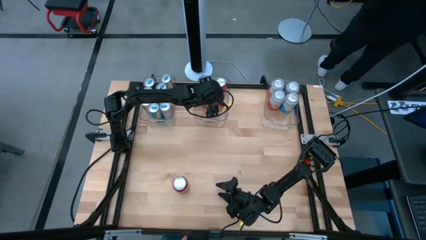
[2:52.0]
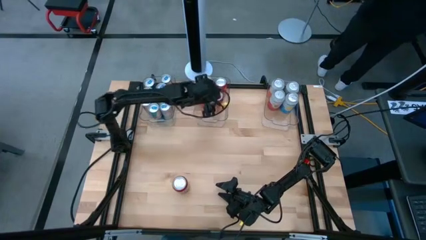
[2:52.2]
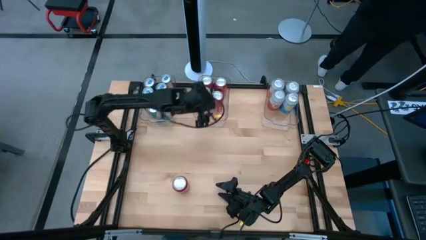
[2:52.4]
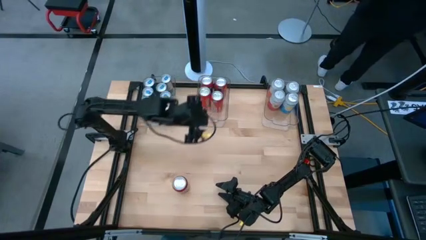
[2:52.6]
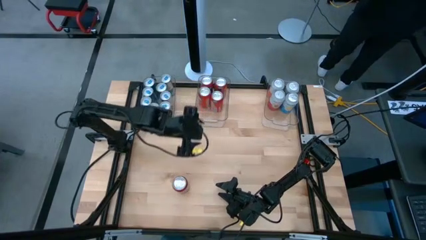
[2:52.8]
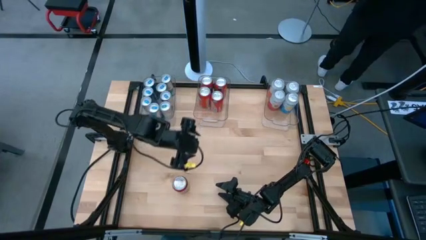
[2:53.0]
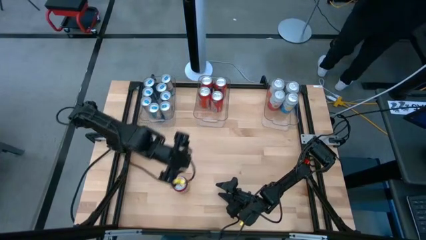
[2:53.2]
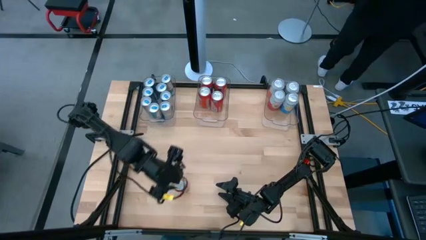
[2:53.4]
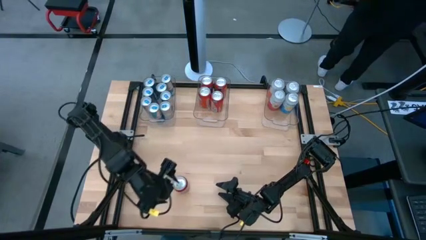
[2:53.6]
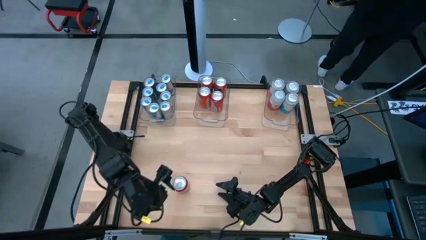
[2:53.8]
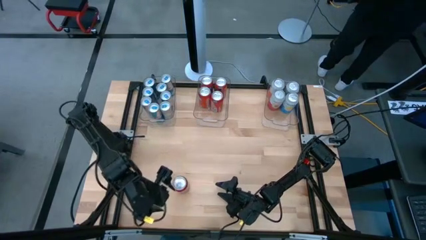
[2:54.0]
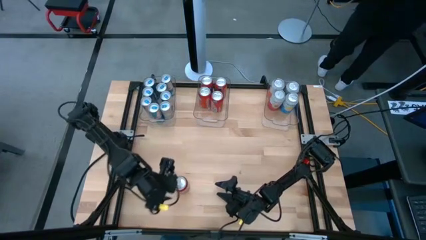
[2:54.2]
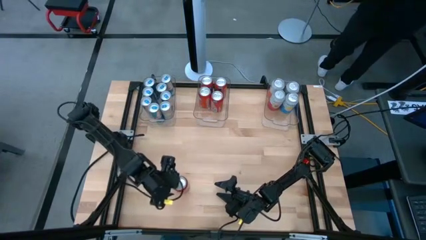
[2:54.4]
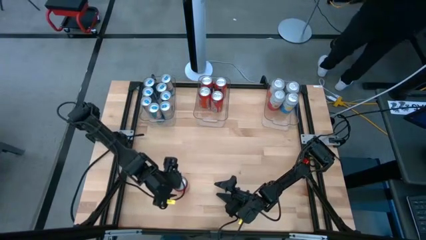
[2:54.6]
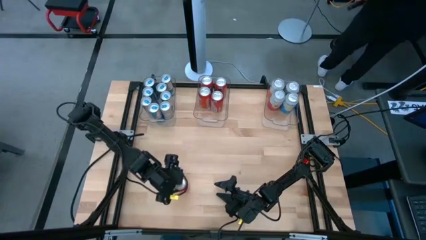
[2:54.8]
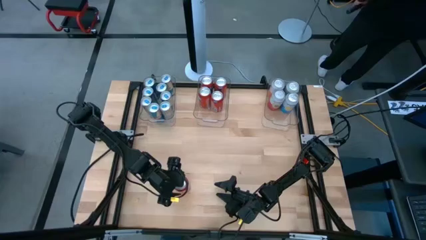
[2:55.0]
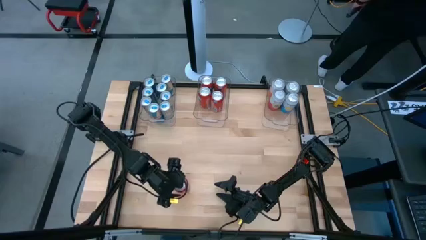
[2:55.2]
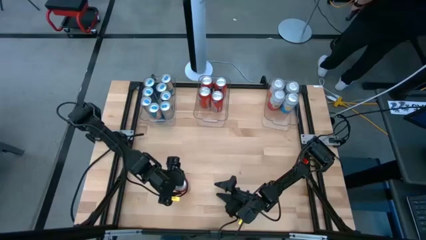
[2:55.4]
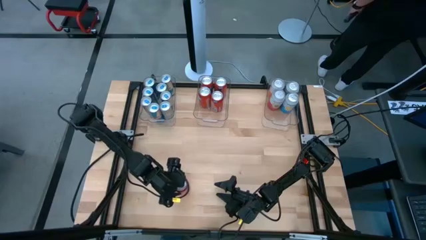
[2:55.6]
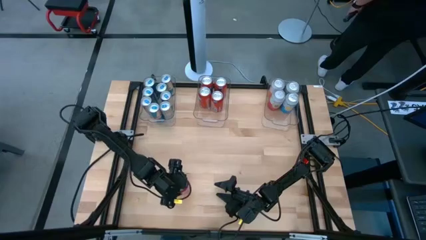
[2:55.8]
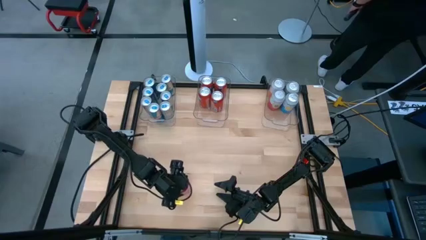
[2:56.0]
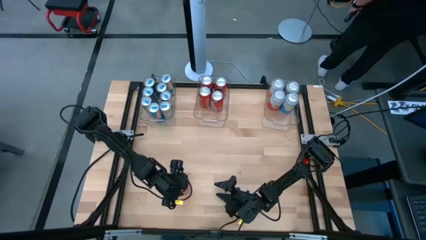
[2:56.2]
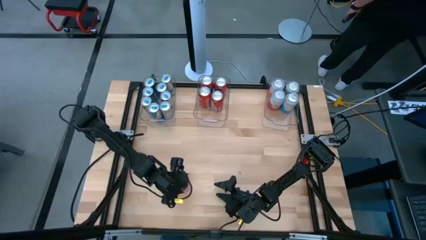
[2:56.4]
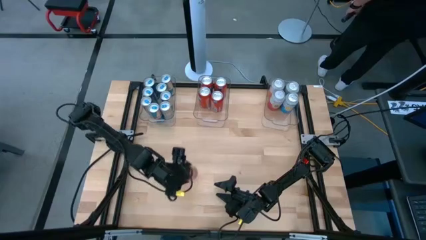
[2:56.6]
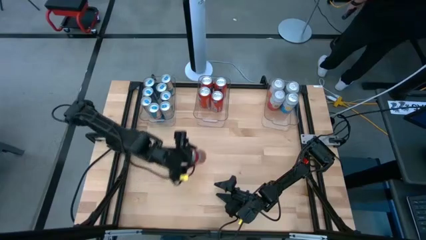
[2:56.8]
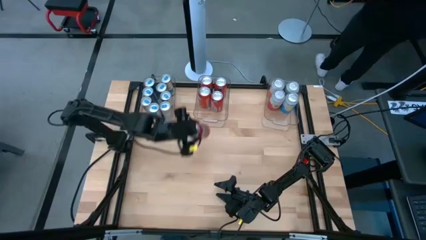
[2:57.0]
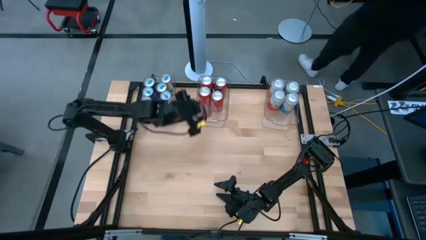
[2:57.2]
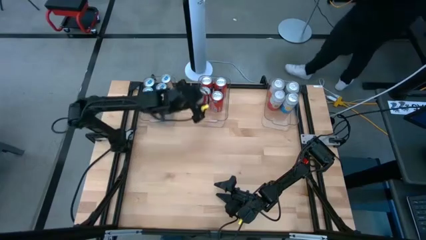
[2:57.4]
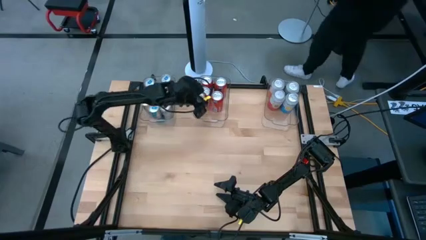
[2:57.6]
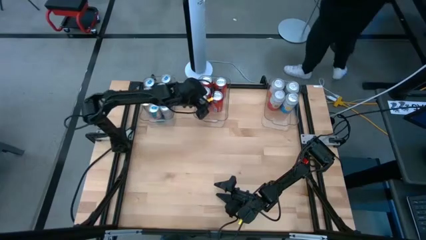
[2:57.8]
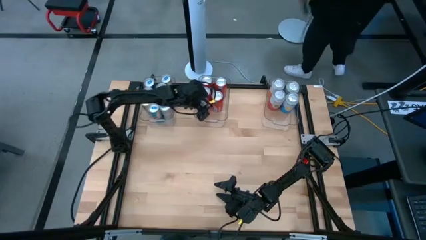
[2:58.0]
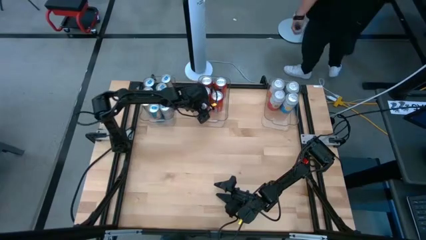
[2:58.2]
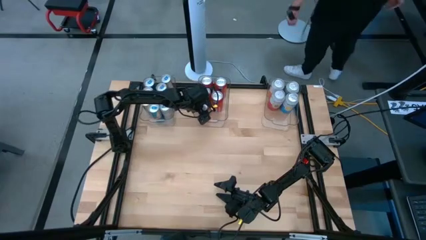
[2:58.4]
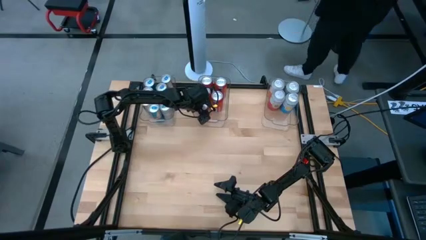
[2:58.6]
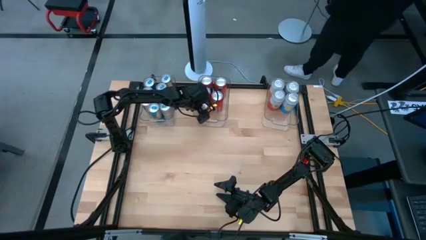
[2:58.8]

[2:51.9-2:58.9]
Task: Sort soda cans
Put the red soda can into the center transparent bin

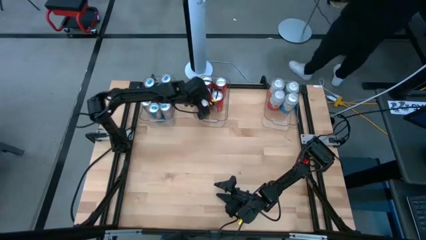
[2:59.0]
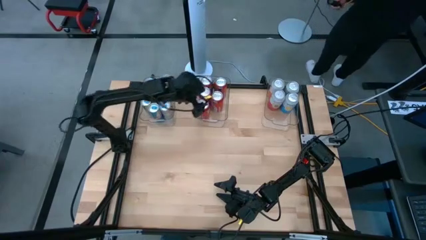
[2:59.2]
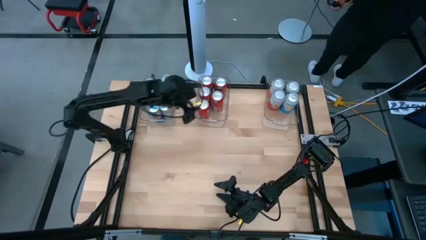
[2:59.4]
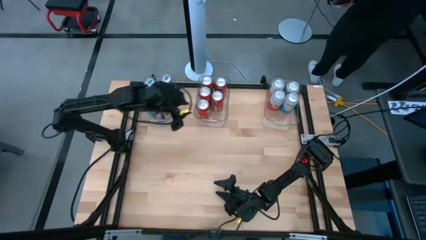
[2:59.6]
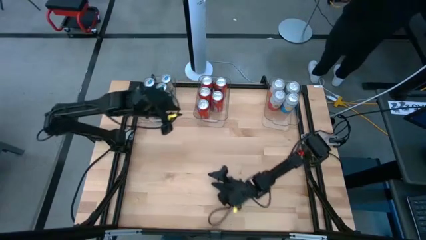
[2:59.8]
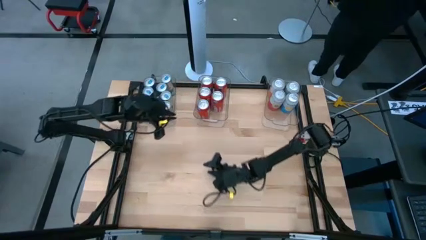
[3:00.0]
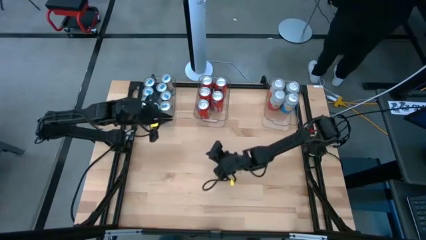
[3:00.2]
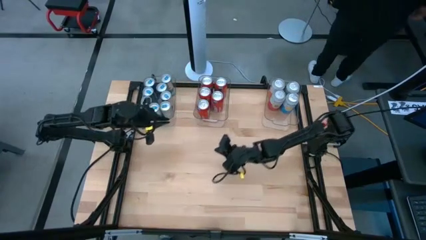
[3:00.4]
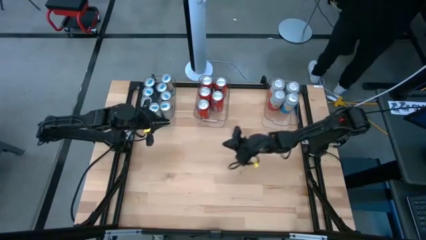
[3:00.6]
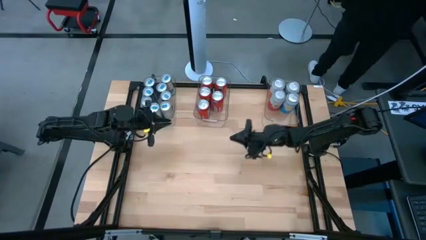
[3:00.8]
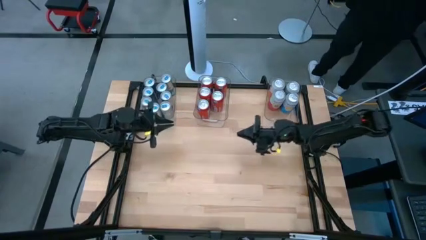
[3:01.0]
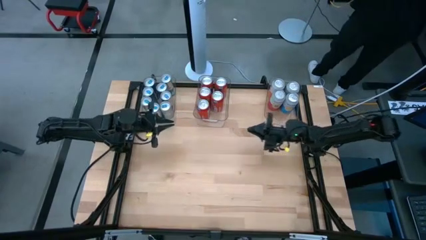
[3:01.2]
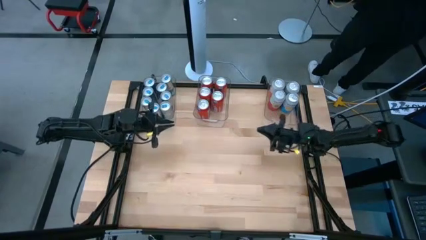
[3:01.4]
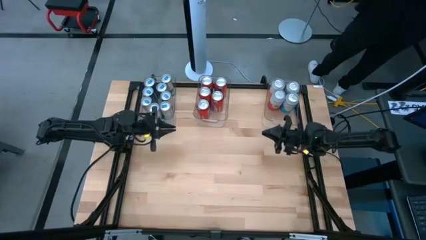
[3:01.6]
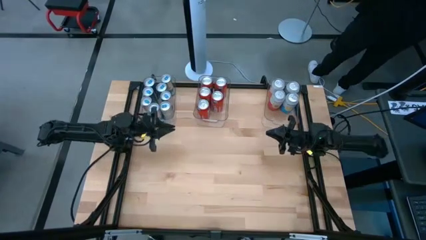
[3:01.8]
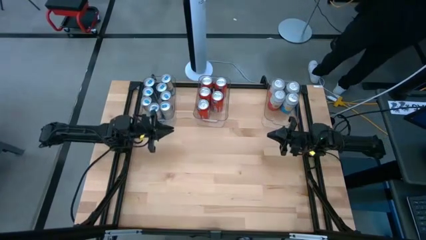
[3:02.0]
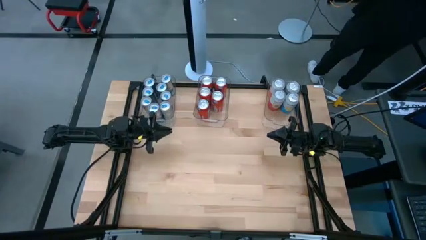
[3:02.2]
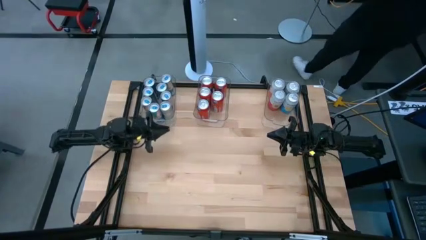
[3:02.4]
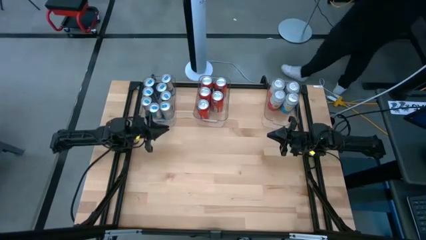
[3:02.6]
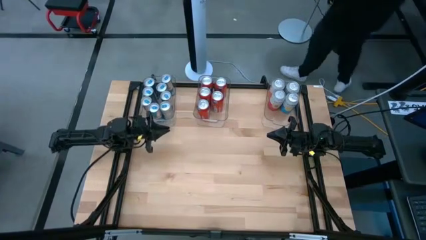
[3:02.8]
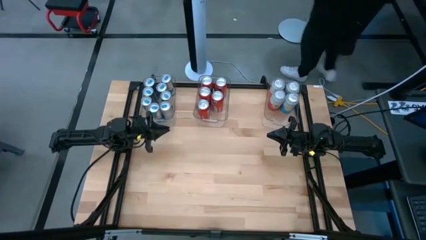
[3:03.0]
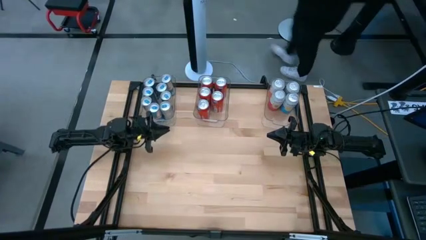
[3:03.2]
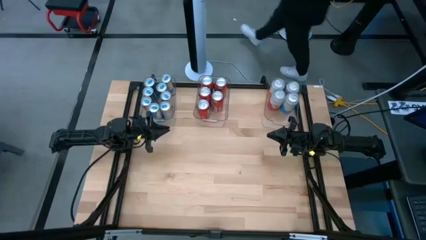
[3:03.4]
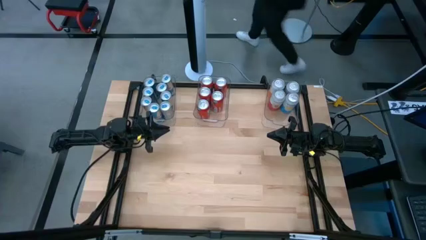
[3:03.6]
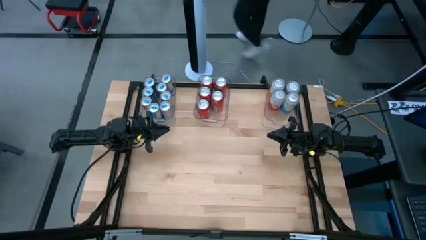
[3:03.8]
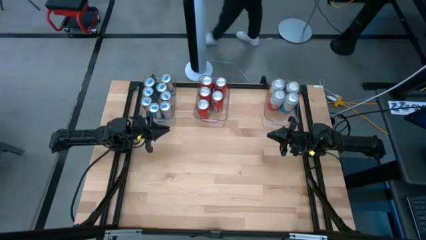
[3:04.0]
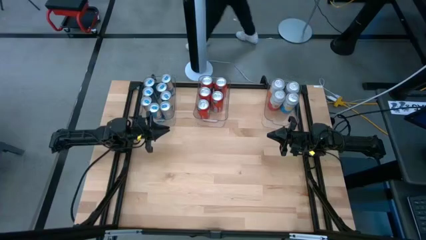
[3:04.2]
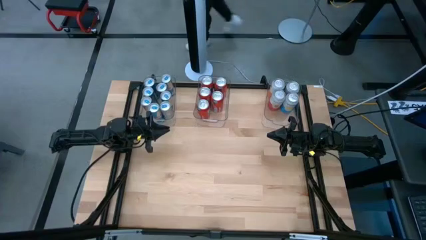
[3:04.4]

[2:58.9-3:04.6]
Return to Home Position

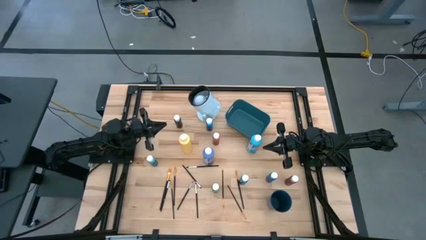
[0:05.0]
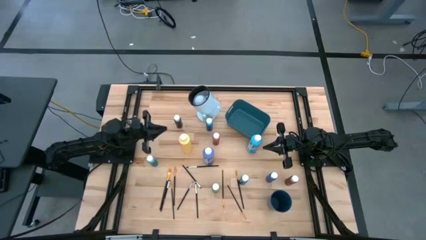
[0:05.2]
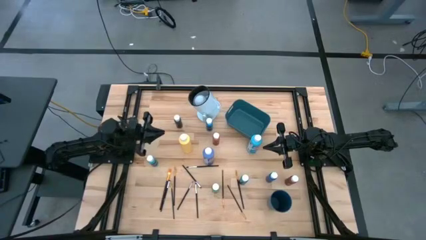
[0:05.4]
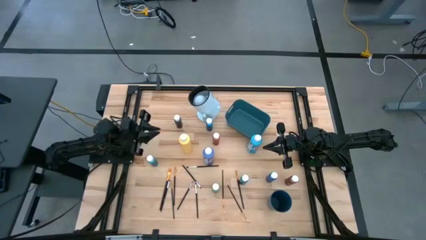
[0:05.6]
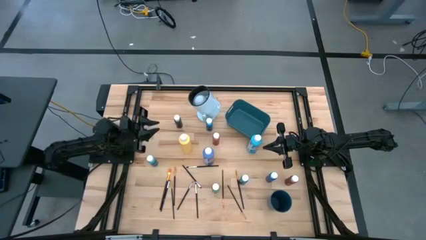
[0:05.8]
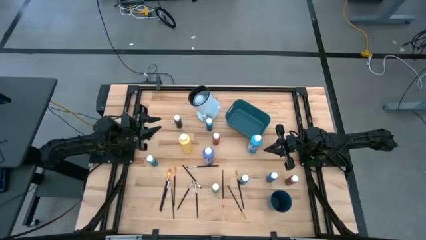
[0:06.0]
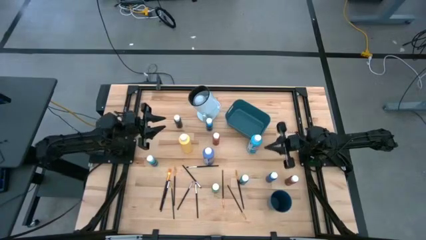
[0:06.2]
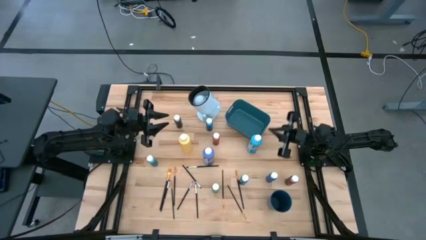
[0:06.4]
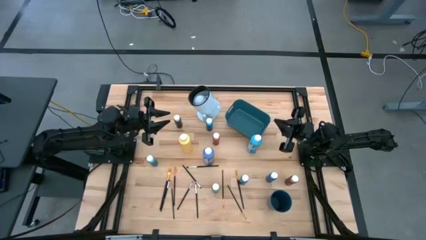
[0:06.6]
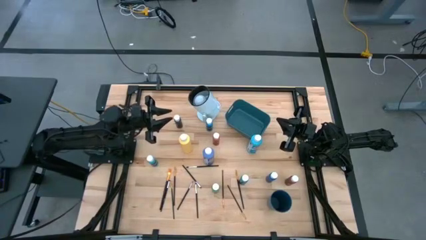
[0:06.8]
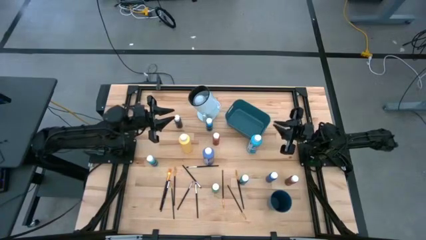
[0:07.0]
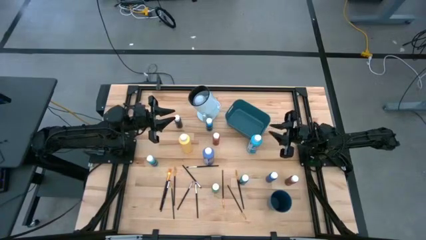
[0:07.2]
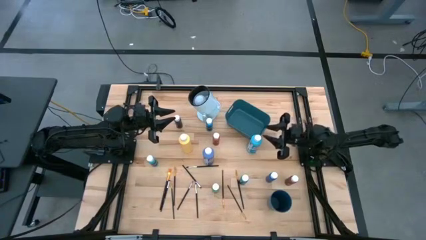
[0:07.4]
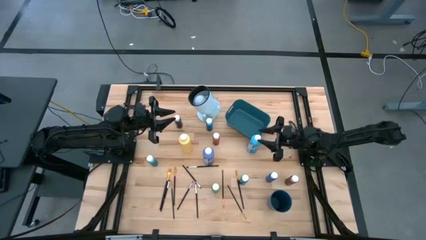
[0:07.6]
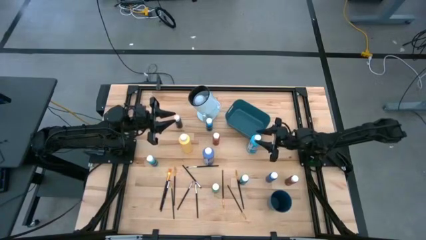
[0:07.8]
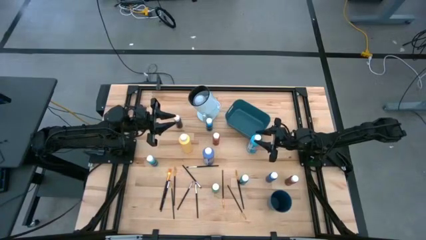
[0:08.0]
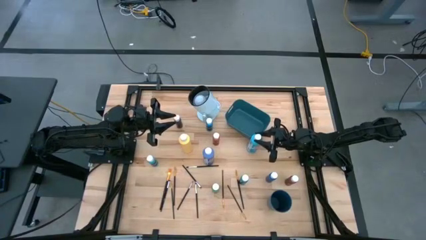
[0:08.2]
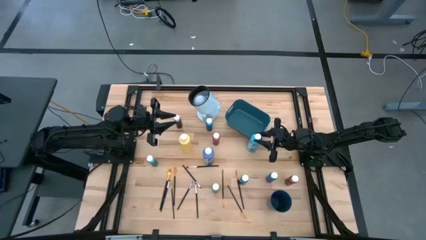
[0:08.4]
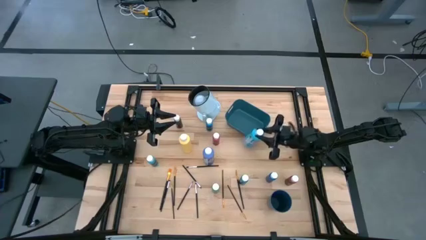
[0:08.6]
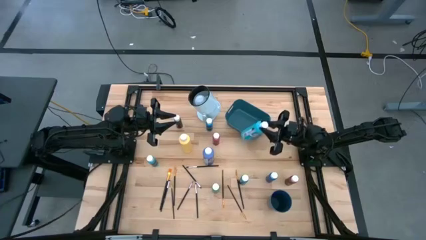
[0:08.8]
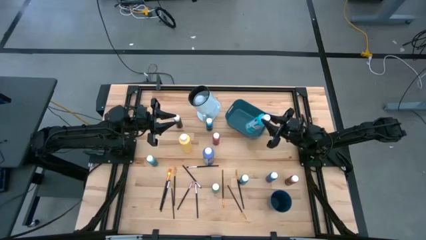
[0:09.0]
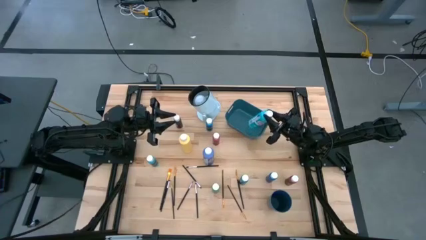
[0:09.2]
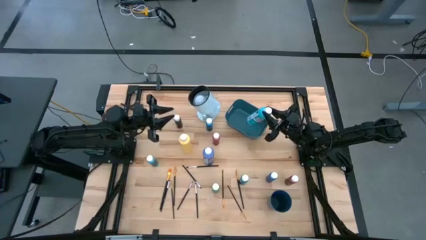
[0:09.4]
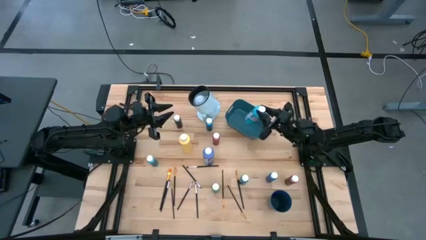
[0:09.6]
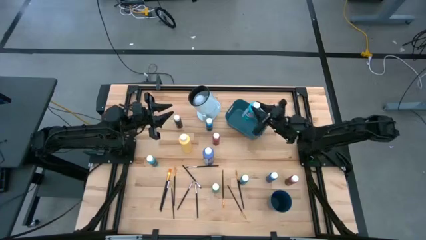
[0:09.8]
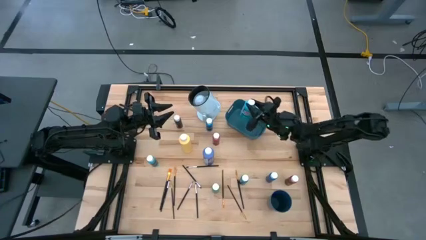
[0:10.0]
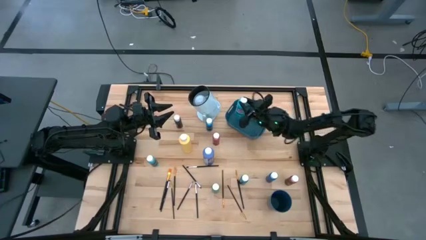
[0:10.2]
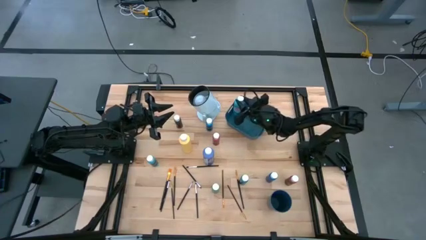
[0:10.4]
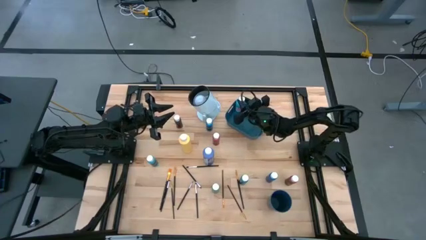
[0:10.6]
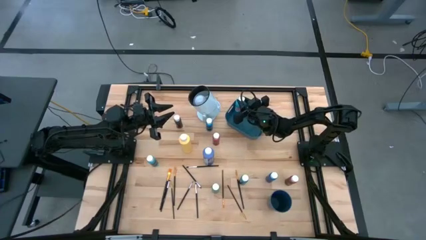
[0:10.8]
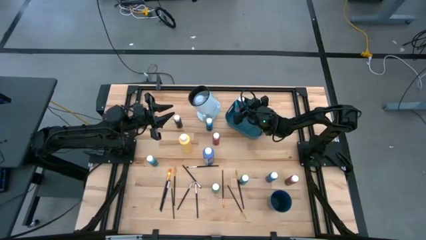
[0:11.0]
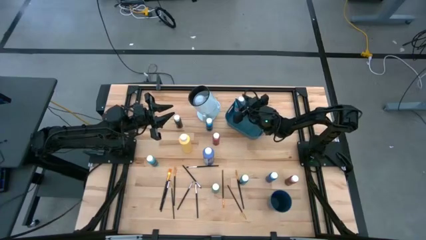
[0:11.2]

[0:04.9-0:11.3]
Task: Pick & Place Paint Supplies
Put the large light blue paint bottle into the blue bin
